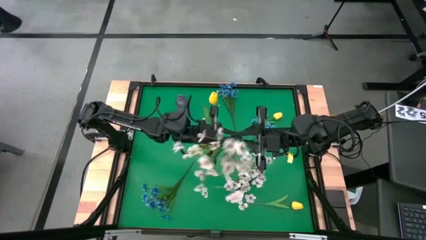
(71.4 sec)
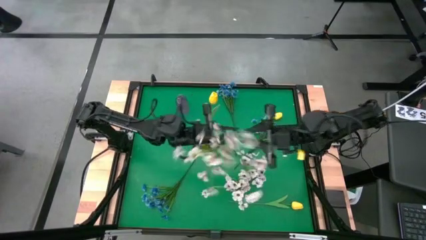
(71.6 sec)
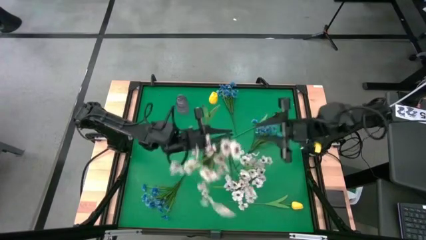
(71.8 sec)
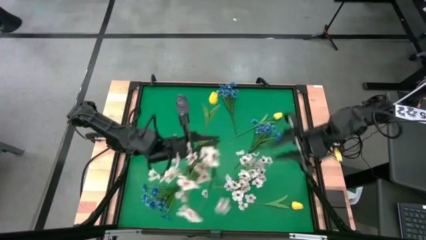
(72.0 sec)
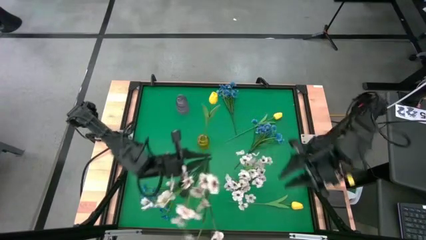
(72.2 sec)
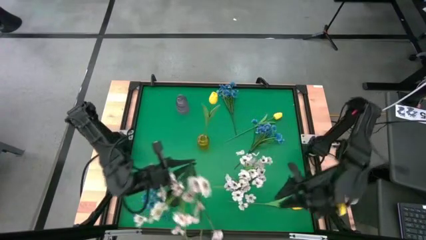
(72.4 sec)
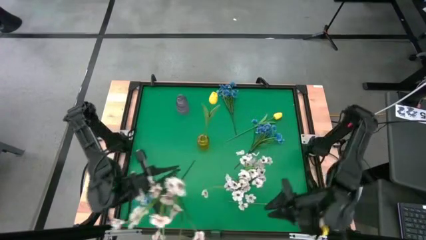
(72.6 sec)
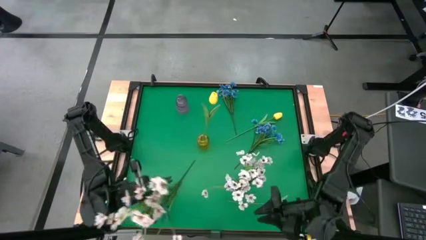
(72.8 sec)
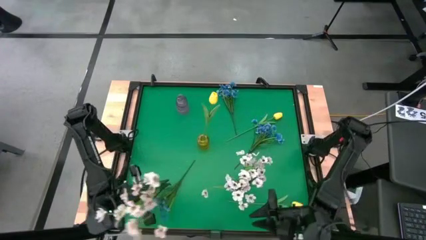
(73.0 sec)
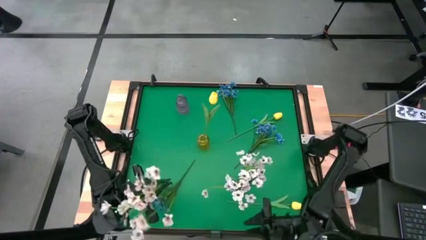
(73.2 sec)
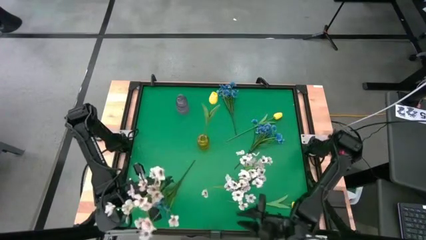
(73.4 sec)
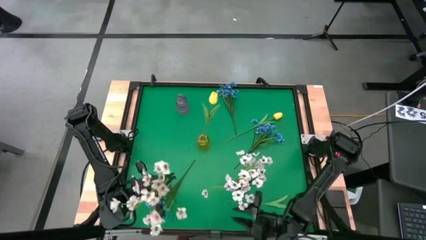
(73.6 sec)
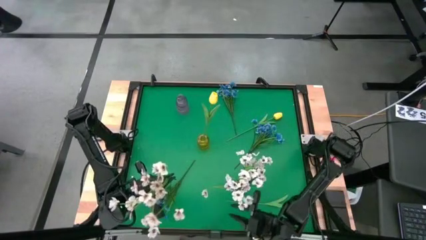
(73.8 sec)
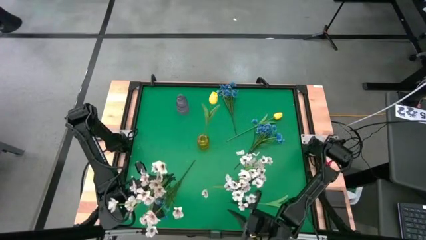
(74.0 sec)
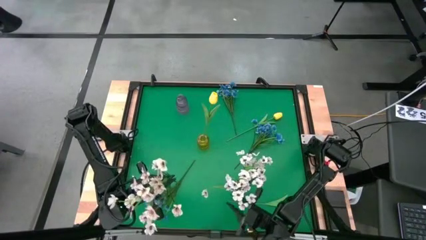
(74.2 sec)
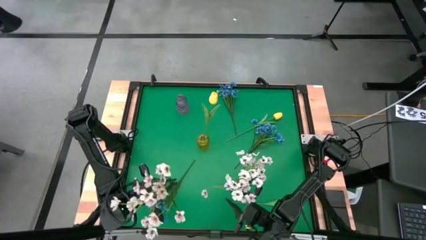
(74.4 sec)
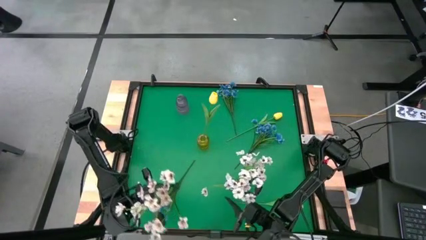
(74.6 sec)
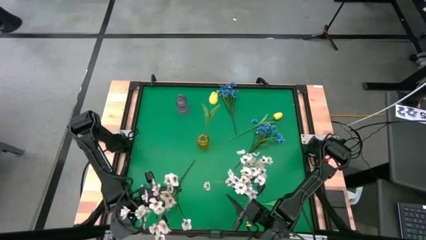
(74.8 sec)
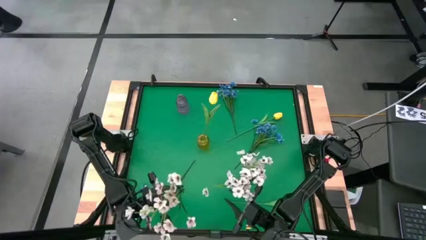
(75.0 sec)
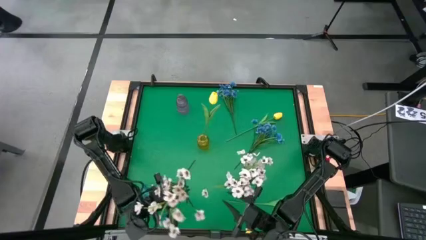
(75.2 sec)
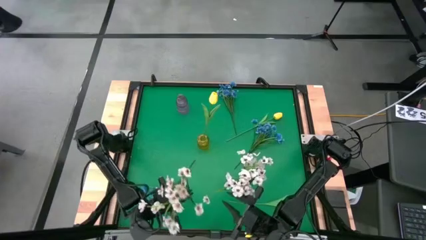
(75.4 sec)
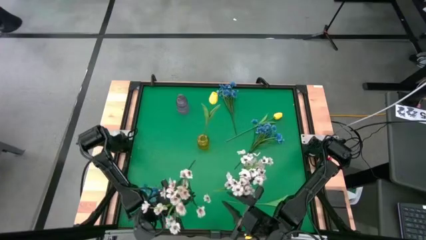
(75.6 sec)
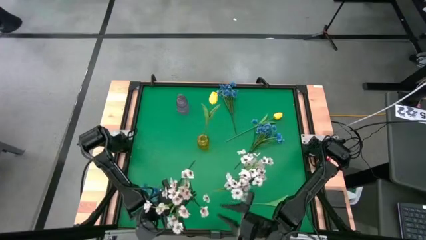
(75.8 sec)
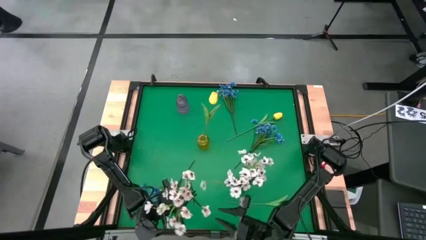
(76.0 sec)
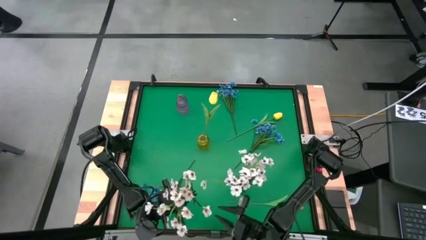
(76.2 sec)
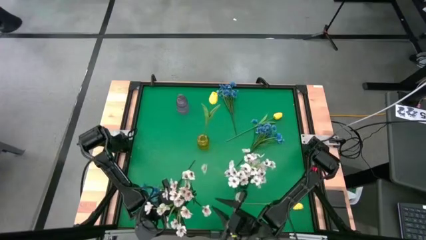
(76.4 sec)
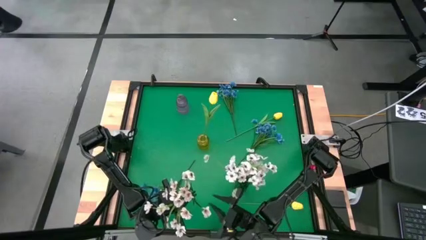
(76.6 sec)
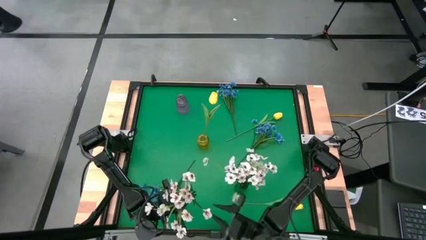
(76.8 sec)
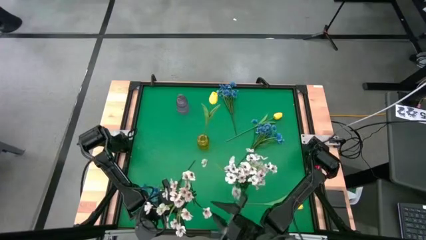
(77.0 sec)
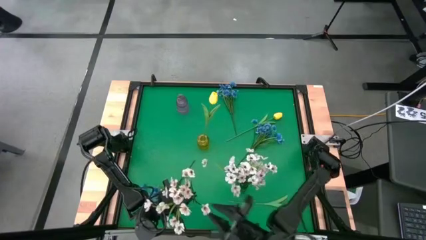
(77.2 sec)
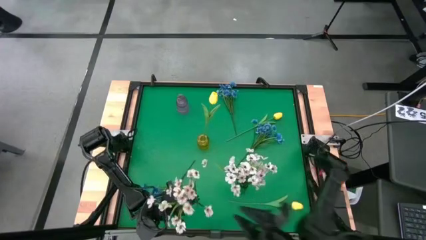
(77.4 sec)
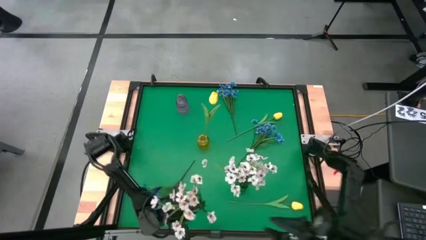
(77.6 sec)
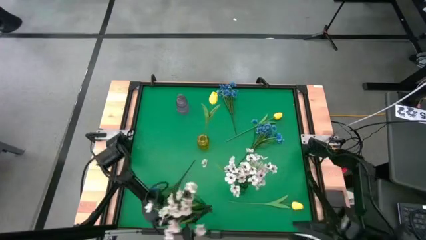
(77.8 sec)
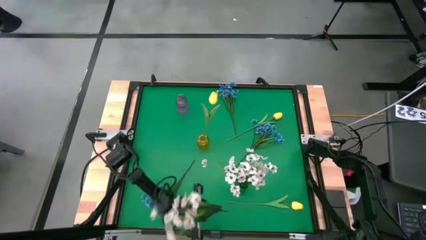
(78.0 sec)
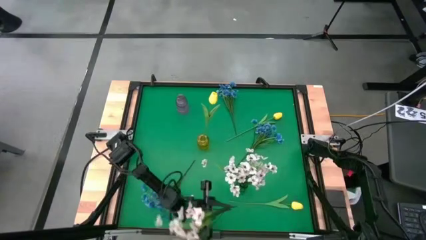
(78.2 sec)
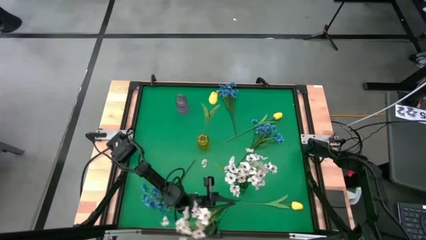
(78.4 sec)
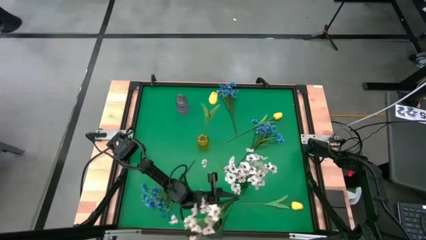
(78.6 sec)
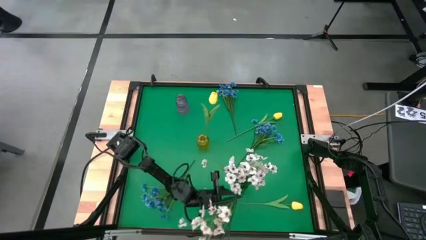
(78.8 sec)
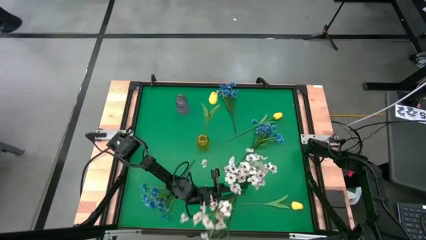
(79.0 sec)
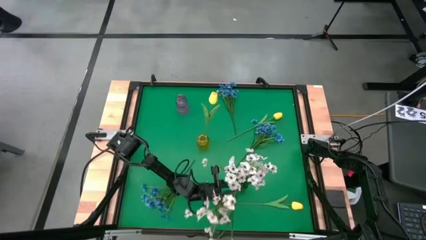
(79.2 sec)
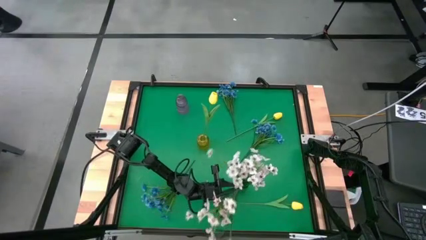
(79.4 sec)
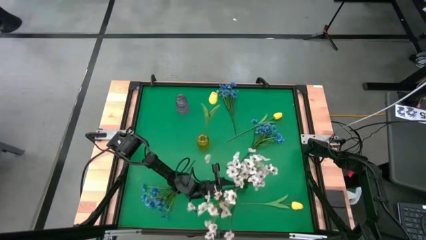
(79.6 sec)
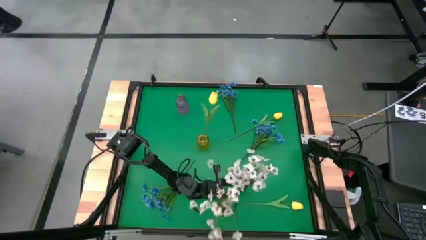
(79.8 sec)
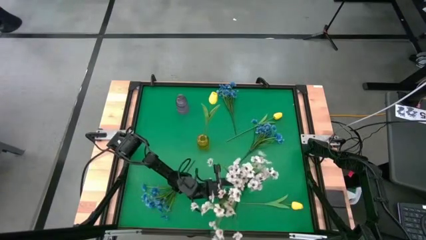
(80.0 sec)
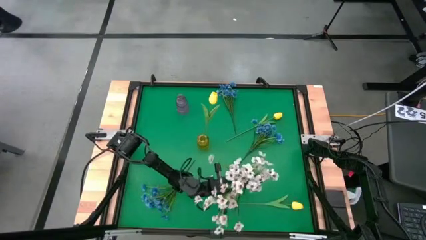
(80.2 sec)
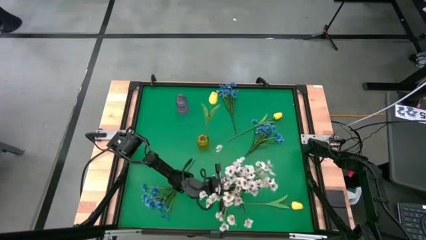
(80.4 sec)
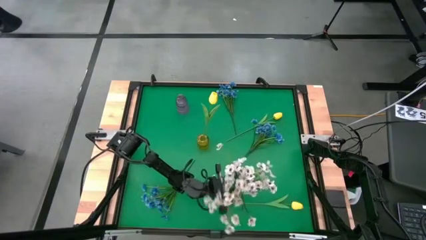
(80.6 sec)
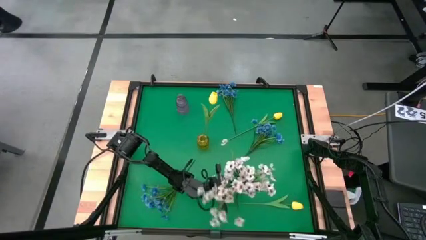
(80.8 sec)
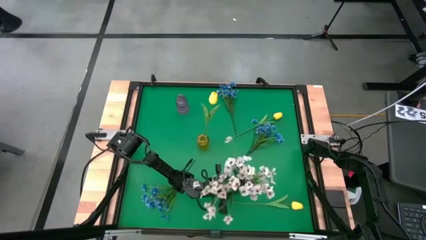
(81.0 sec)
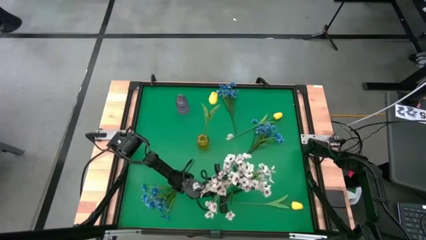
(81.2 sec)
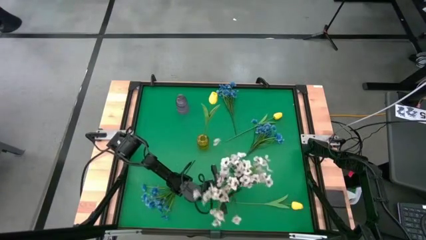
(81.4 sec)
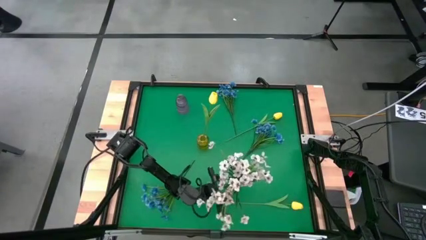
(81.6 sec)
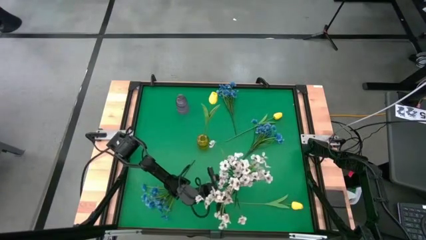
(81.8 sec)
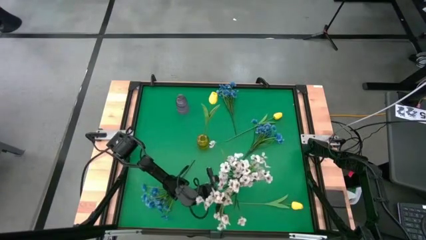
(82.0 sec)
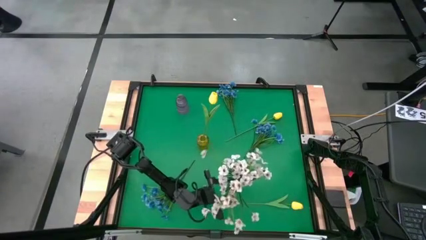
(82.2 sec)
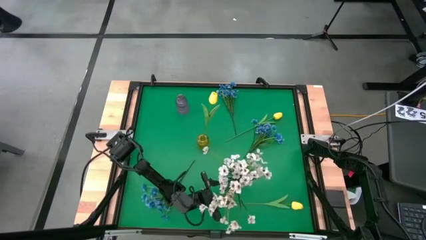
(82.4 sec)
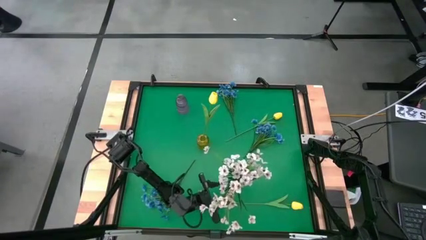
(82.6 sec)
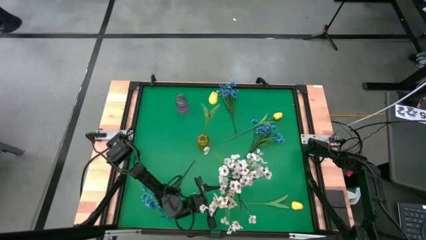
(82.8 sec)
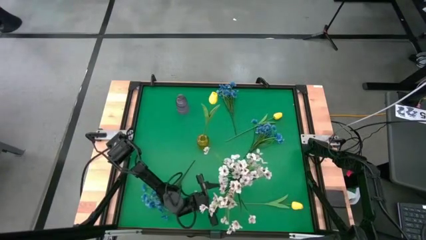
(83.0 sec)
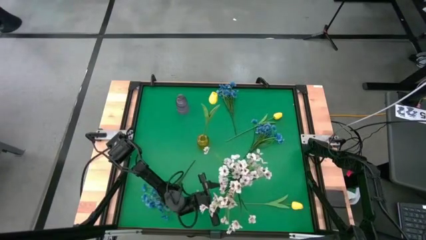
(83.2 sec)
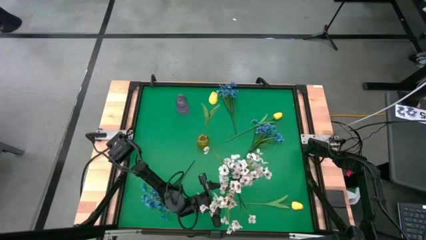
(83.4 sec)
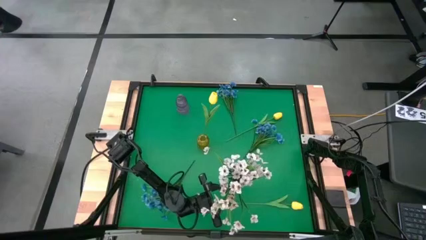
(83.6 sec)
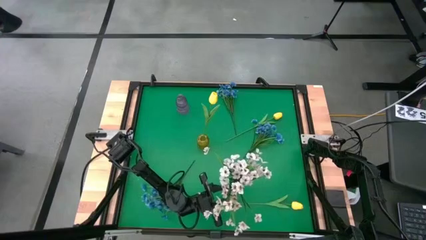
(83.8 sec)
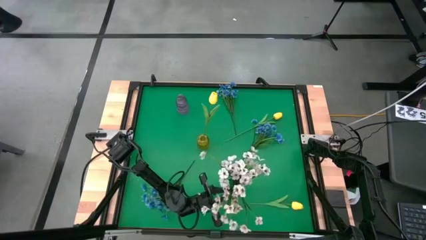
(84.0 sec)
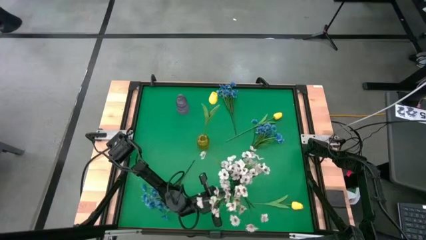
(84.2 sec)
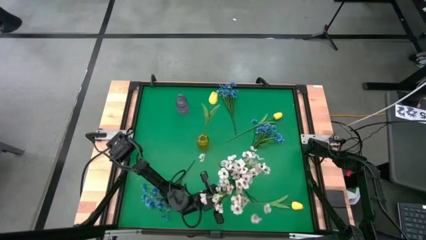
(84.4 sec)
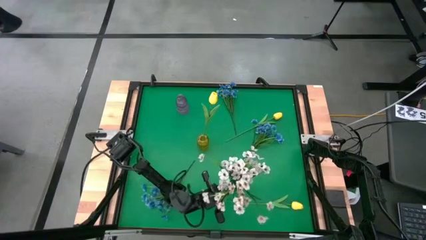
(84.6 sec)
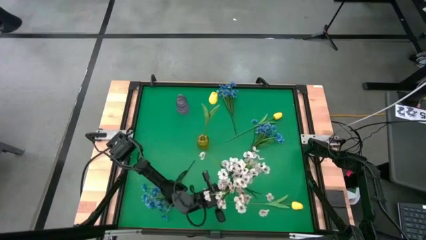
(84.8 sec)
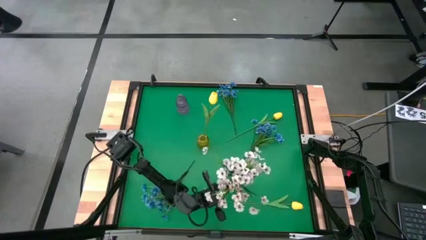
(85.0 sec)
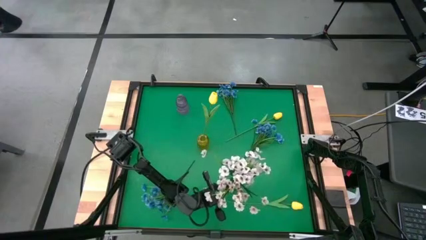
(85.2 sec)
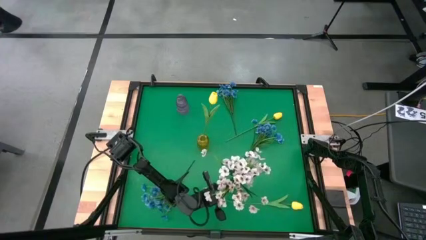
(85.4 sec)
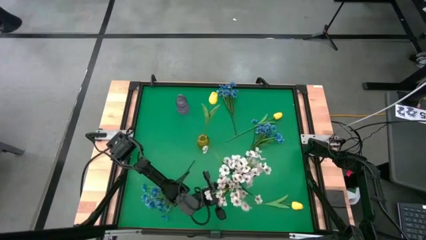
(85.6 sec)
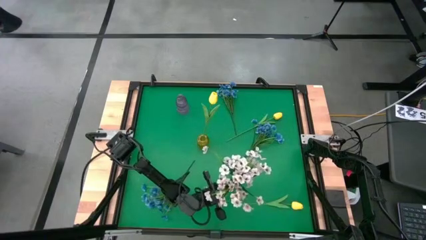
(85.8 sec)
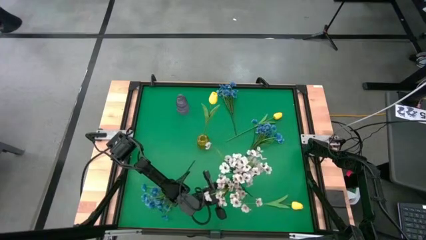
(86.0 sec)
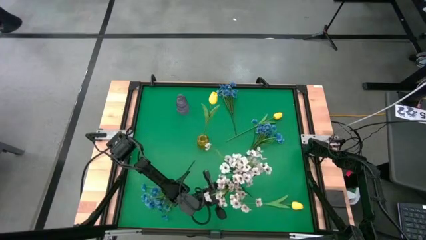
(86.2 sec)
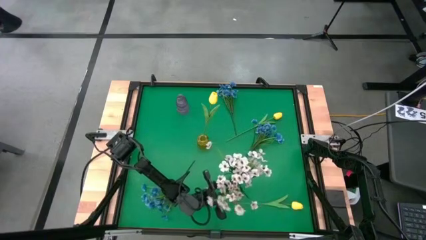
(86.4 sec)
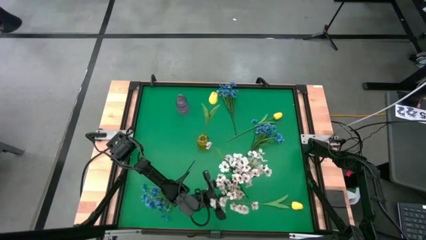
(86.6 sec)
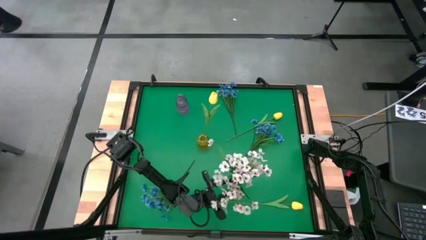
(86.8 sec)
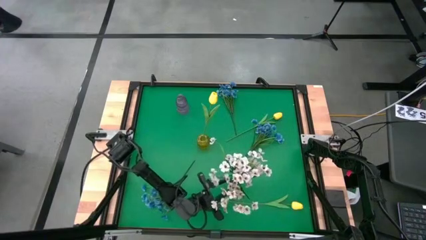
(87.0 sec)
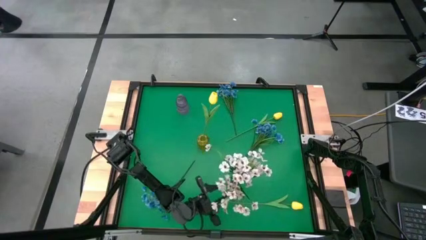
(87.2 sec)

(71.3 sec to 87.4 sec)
Task: Sort flowers into vase by color
Put the white flowers into the green vase
